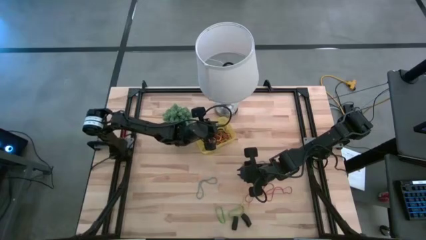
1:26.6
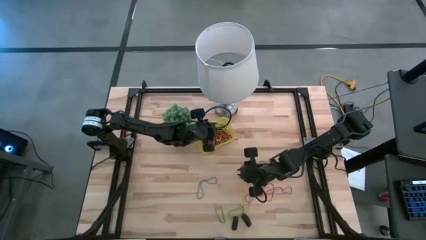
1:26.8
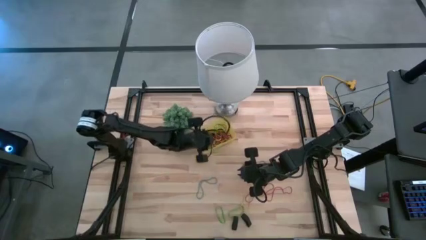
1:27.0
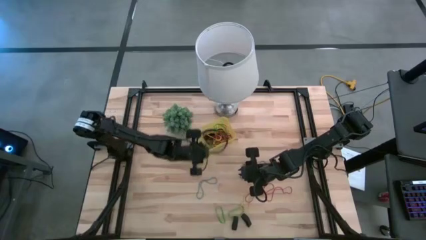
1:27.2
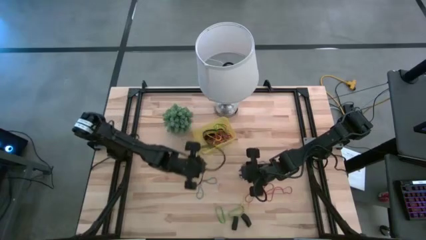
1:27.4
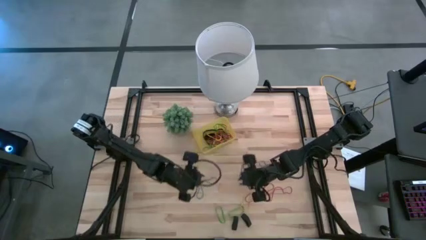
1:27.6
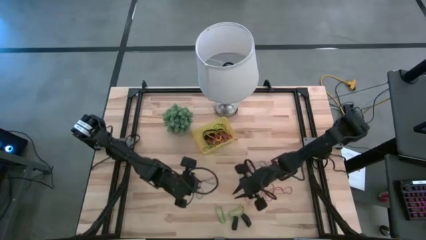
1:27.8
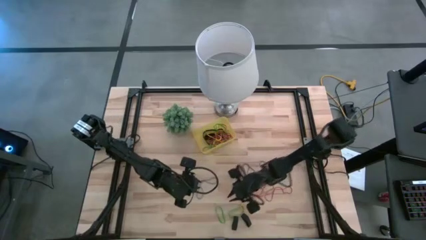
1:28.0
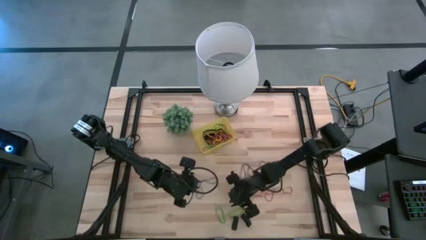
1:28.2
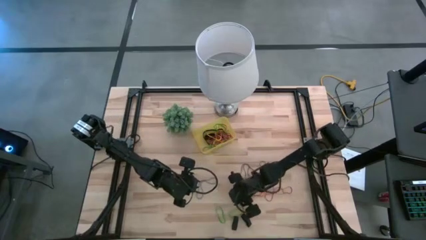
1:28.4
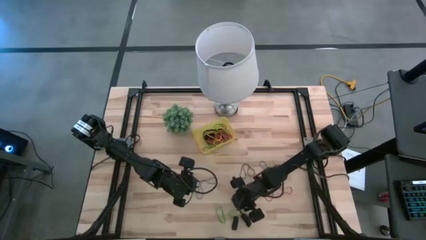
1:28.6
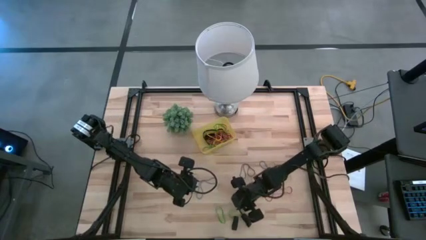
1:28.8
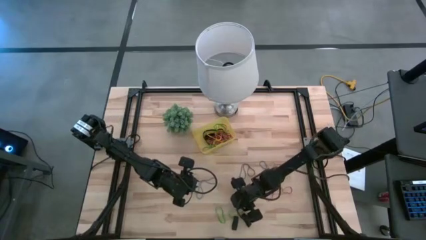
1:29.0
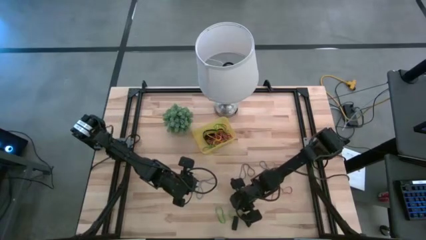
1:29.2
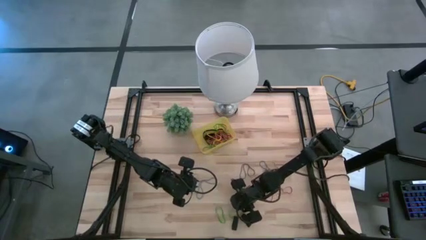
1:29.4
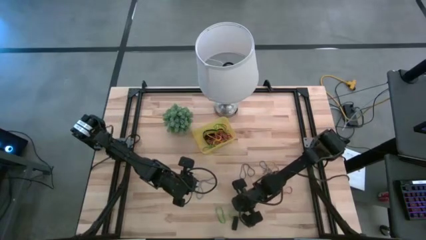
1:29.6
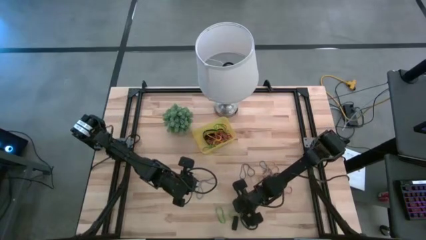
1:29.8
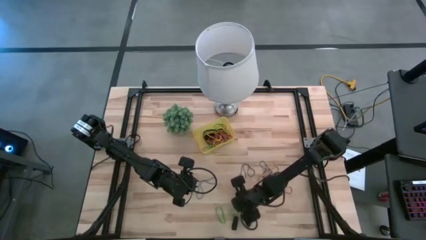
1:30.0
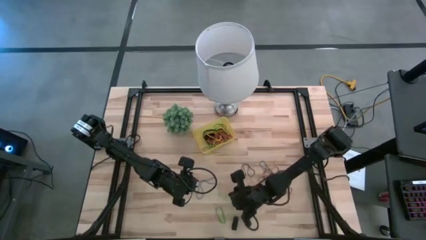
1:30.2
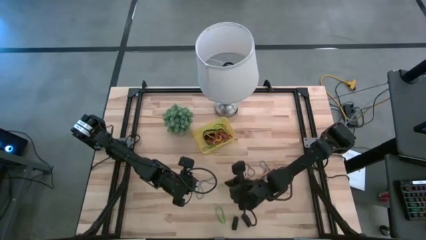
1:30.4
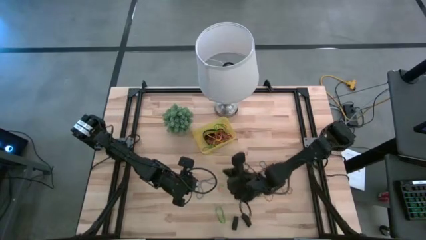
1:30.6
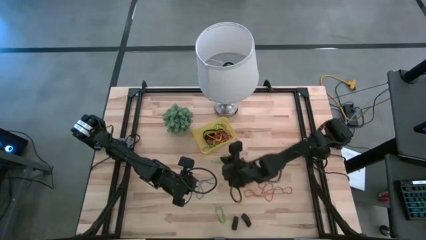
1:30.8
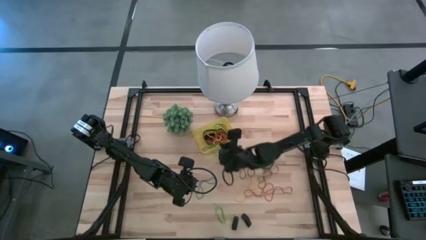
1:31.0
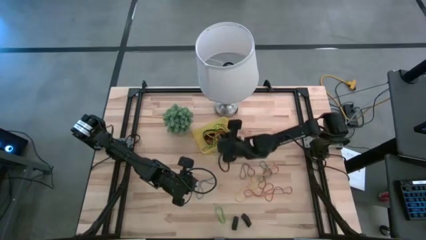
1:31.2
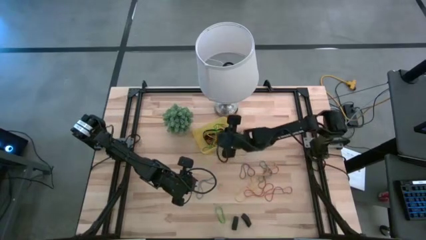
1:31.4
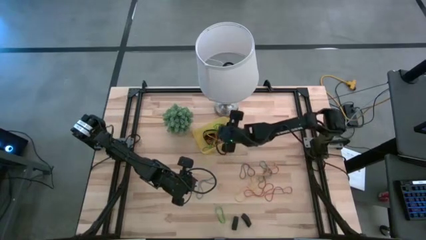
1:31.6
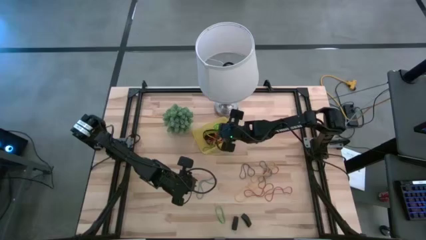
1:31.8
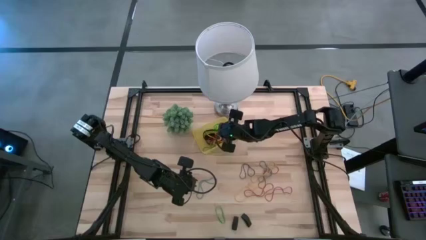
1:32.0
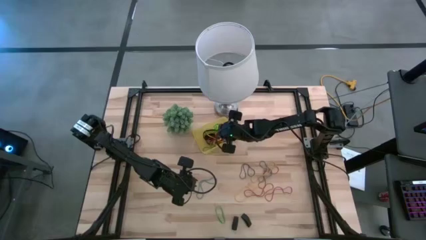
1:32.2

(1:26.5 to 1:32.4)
Task: Pick and place rubber bands into bin
Put the right green rubber band into the yellow bin

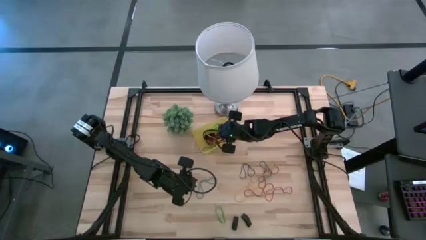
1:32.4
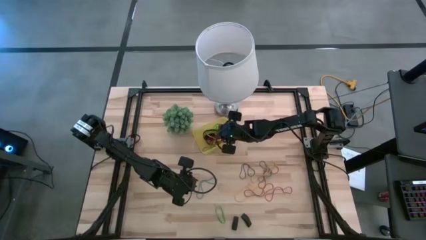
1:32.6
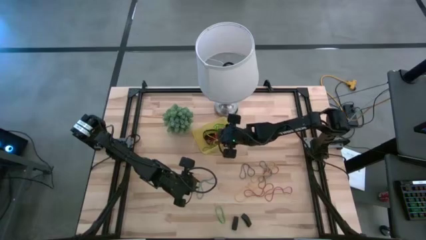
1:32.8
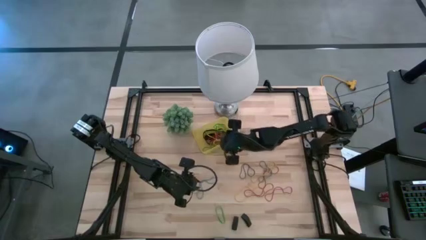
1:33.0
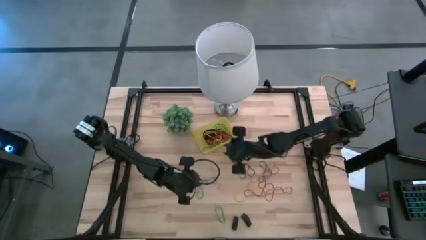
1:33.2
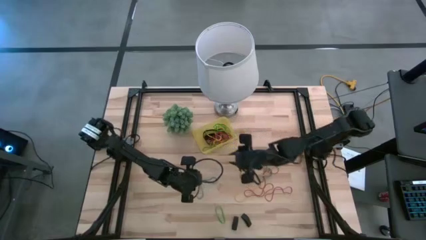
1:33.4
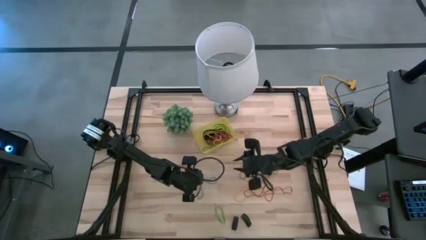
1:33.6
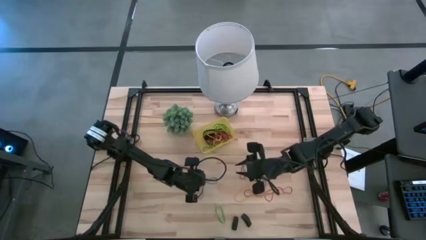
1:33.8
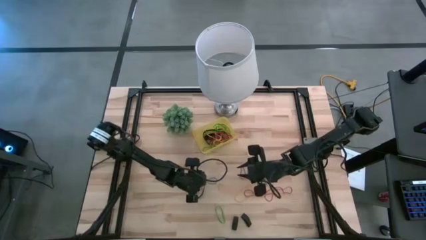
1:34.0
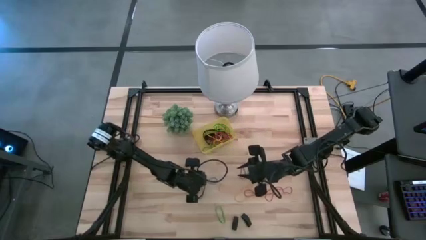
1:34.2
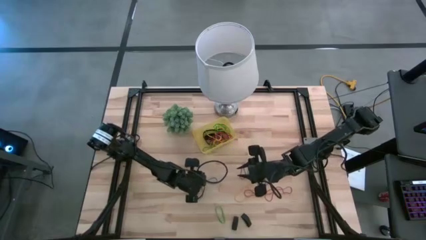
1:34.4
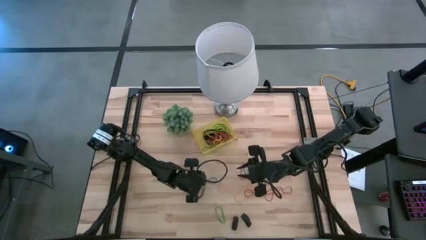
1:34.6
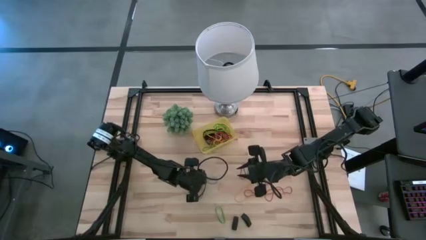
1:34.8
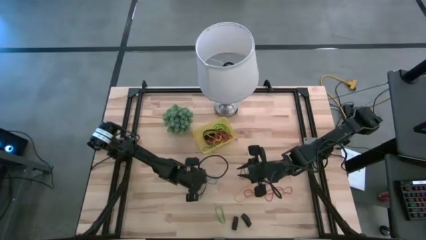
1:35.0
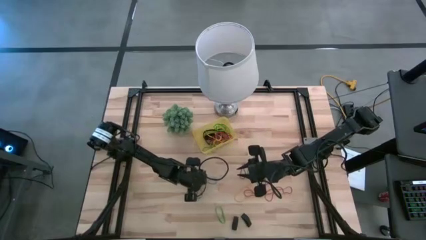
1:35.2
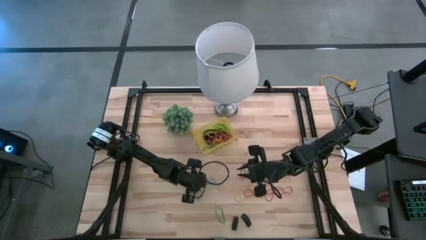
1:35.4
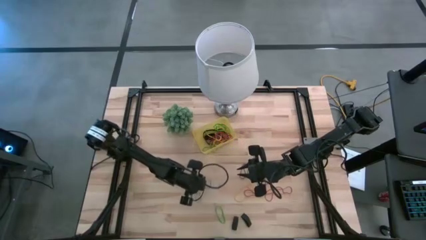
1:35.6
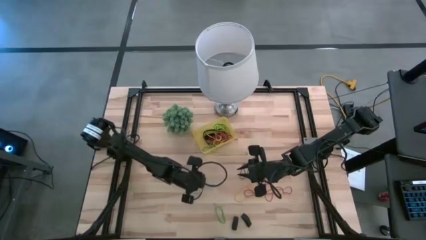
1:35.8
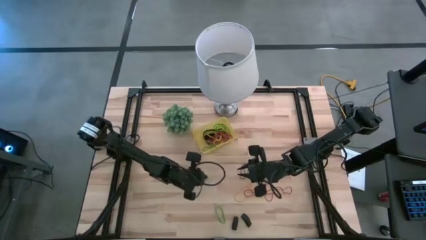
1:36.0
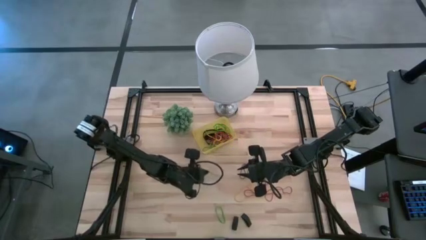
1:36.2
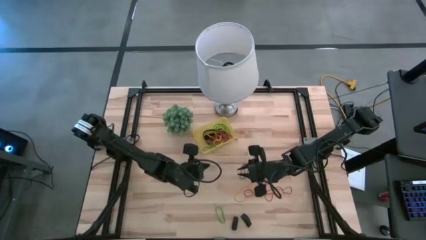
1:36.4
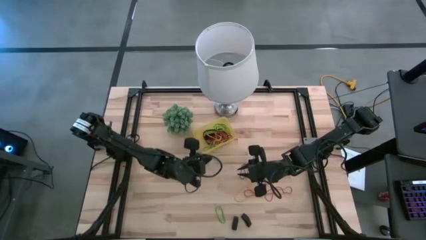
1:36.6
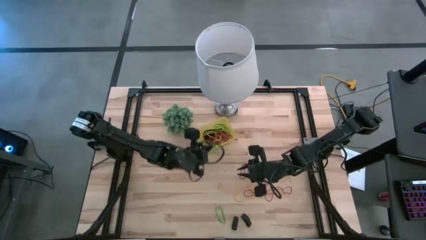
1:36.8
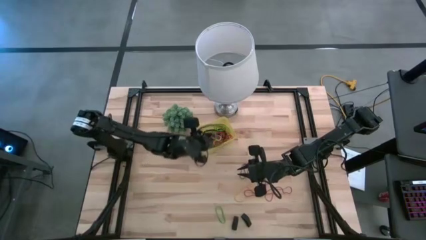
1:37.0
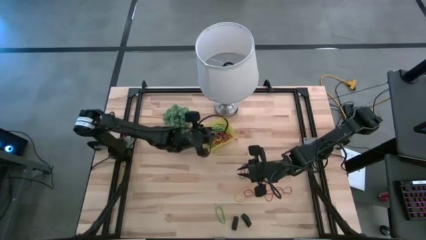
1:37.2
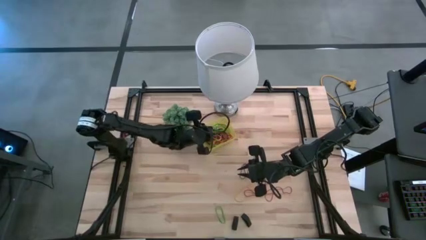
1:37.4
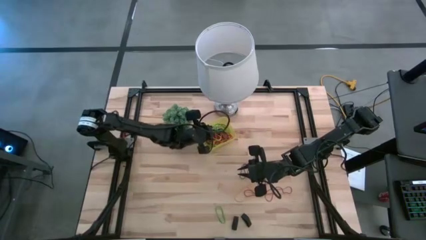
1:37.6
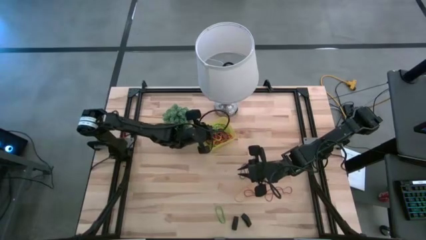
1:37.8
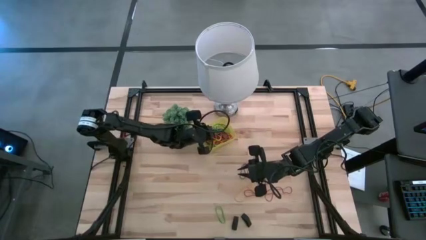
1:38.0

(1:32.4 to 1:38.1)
Put the left blue rubber band into the yellow bin

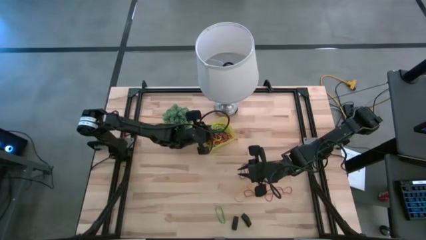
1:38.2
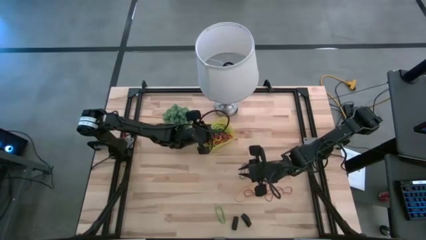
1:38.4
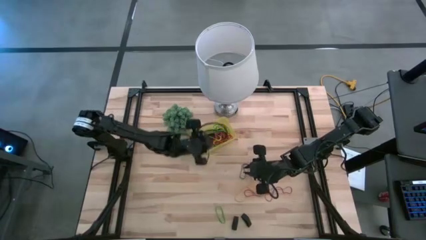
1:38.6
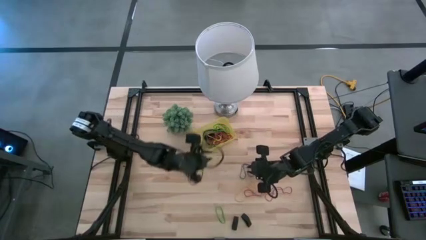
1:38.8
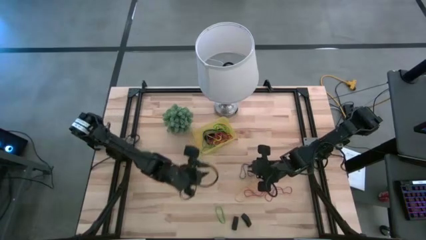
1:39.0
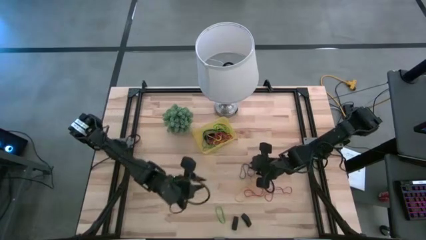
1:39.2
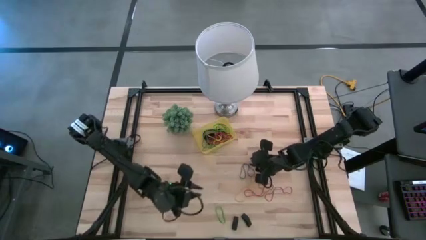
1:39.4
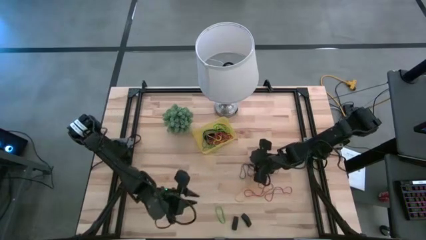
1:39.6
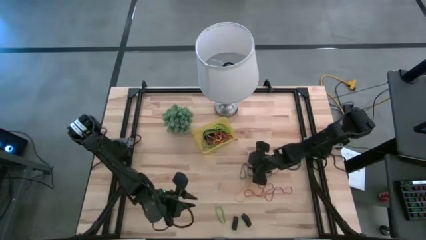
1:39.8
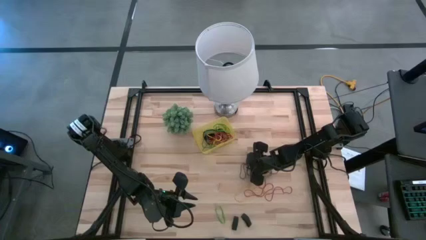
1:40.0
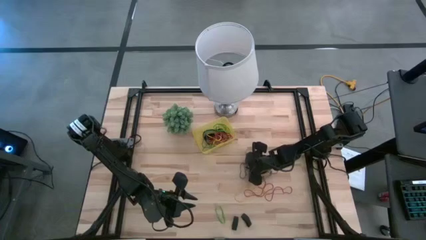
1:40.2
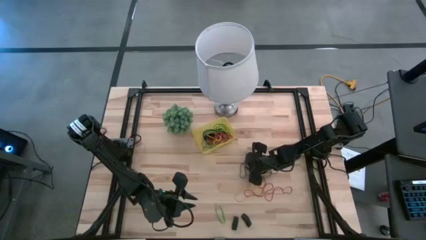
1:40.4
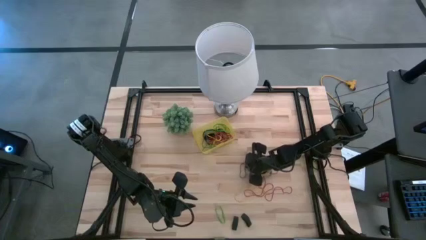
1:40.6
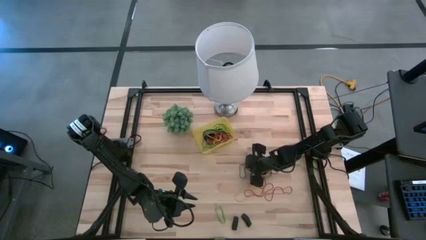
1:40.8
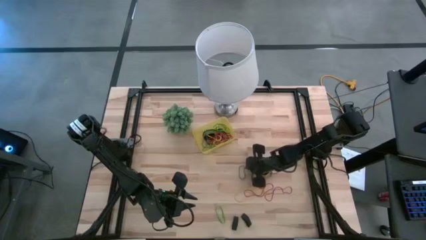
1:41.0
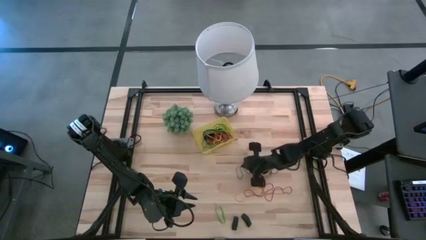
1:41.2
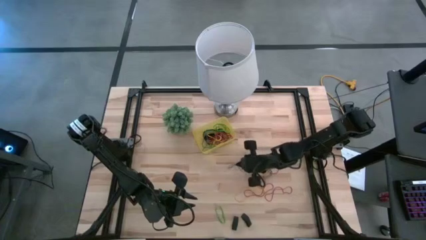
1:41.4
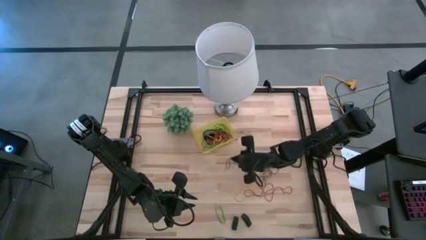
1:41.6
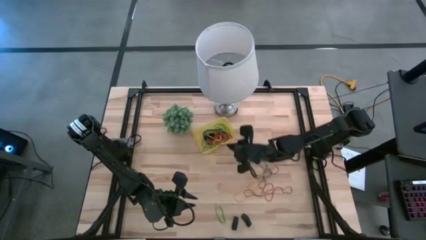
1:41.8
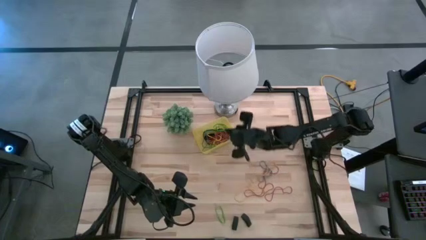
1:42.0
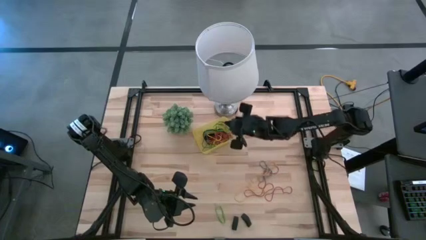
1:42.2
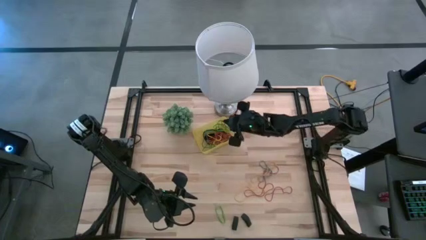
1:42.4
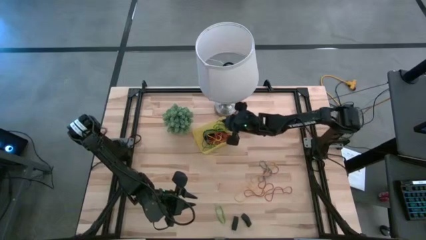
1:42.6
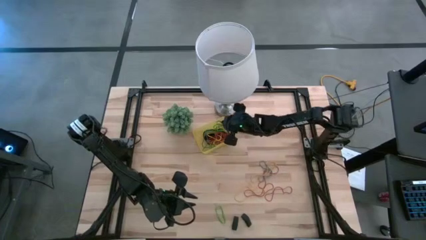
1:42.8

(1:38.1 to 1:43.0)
Put the purple rubber band into the yellow bin

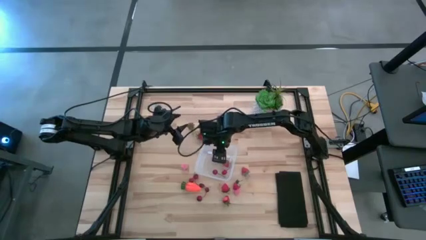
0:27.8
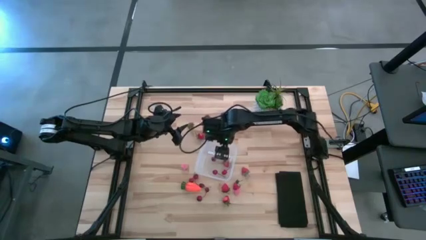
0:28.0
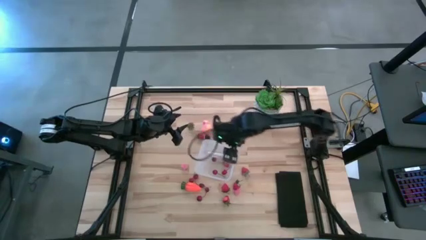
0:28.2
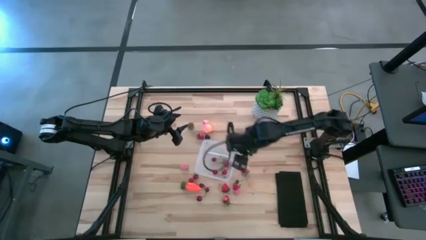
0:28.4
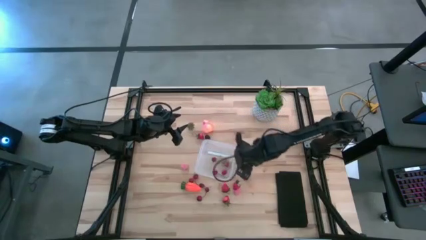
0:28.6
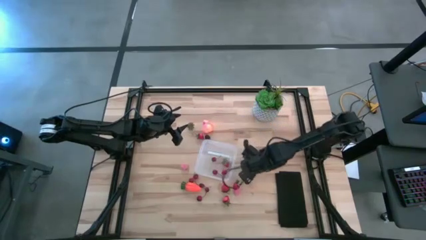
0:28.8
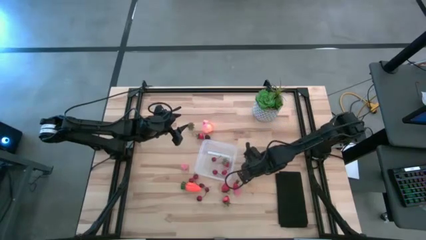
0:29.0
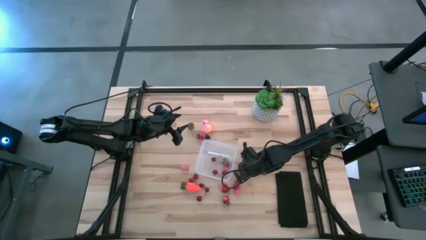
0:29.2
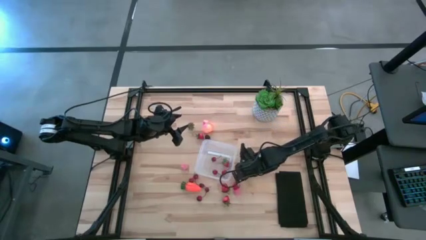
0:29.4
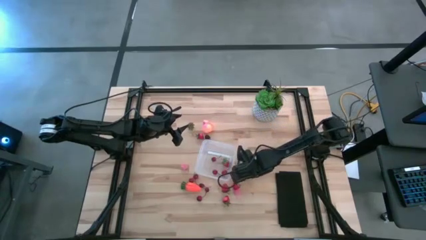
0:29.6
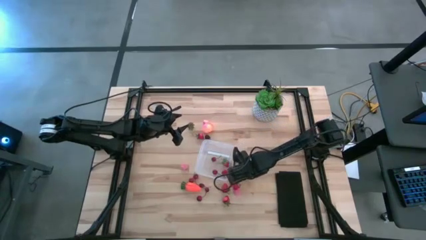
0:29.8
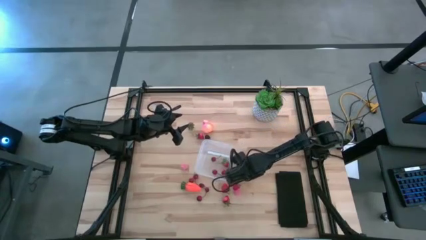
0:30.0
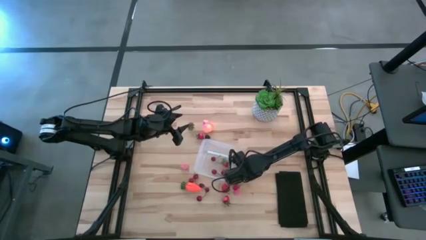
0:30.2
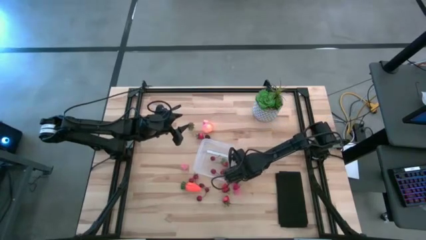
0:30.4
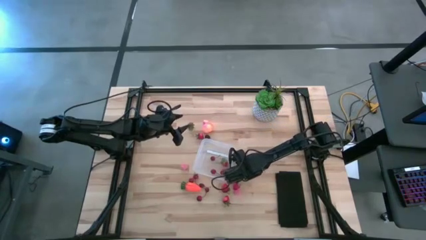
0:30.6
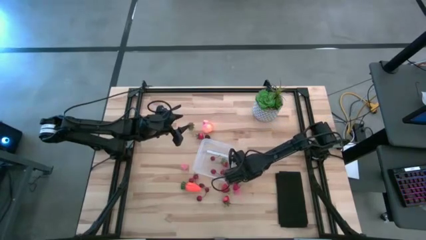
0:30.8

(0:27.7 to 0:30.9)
Task: Pick and placing Produce into tupperware
Put the red strawberry into the transparent container
